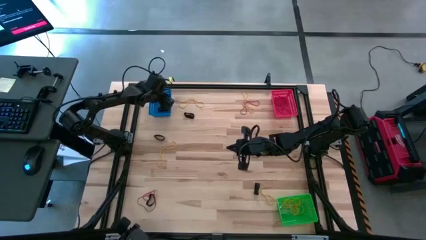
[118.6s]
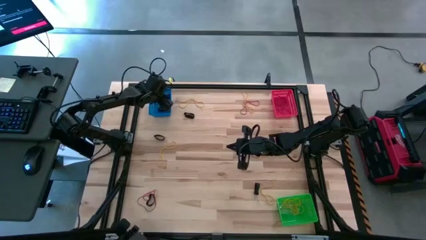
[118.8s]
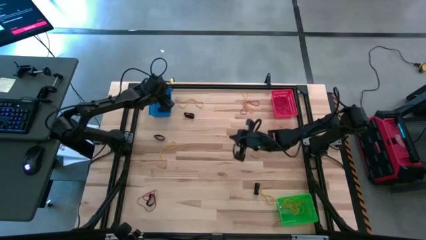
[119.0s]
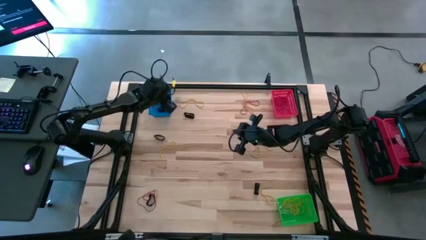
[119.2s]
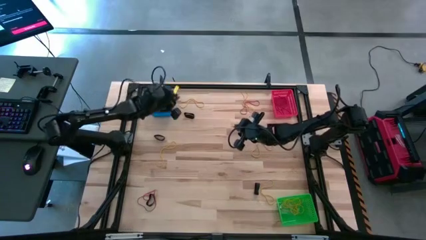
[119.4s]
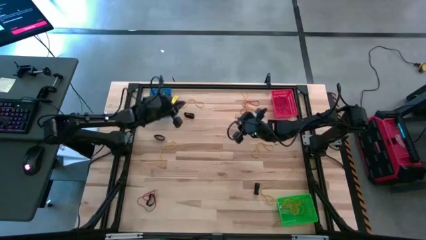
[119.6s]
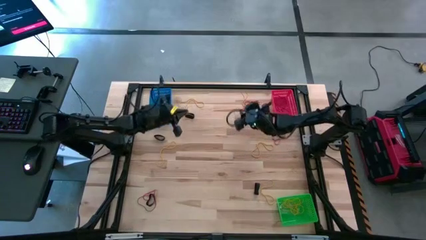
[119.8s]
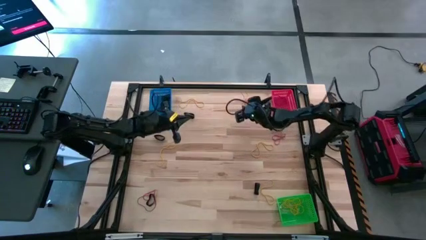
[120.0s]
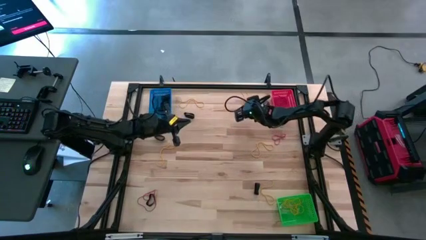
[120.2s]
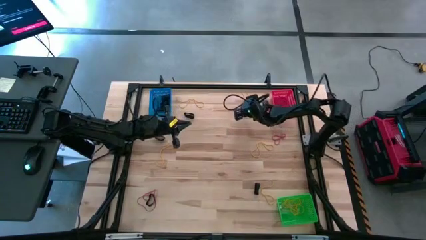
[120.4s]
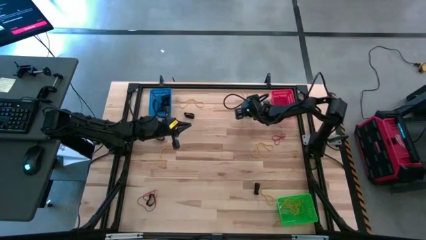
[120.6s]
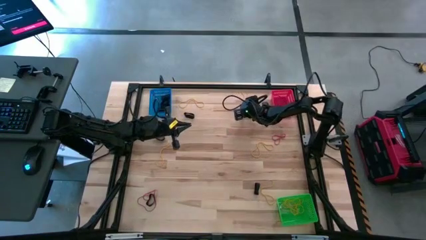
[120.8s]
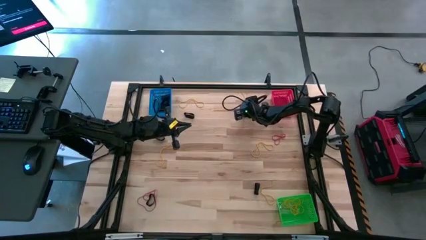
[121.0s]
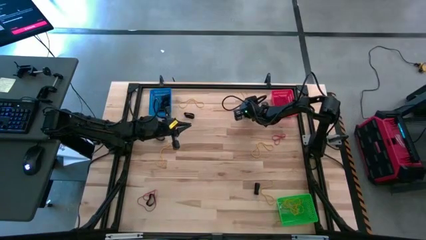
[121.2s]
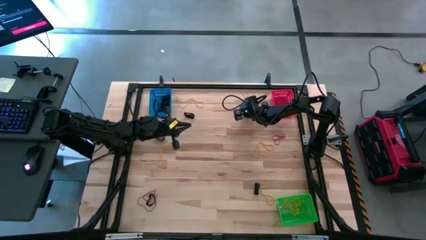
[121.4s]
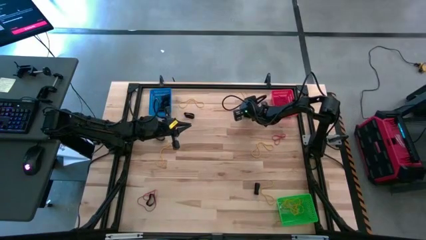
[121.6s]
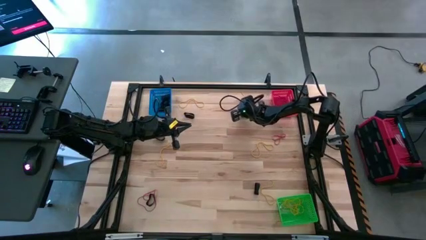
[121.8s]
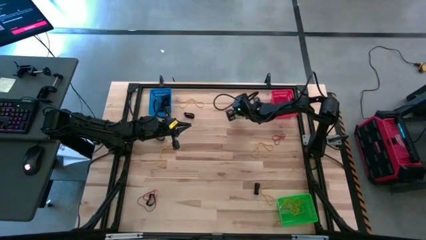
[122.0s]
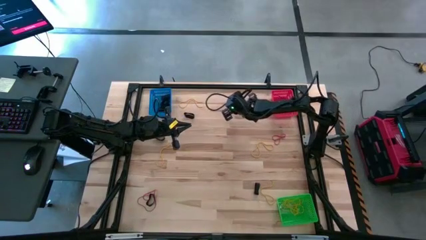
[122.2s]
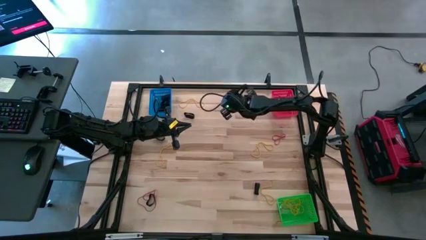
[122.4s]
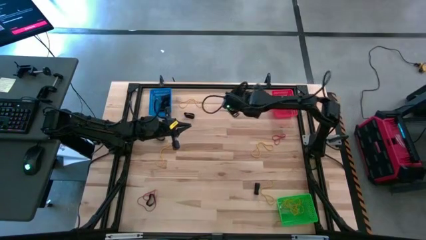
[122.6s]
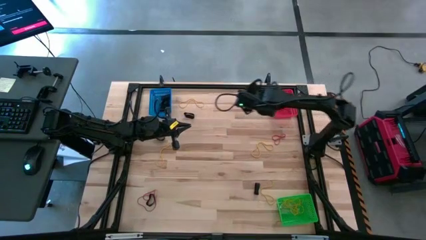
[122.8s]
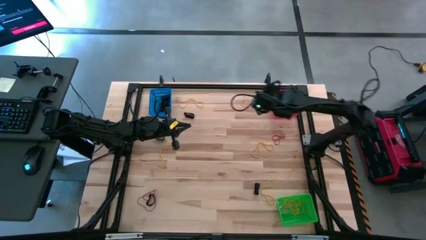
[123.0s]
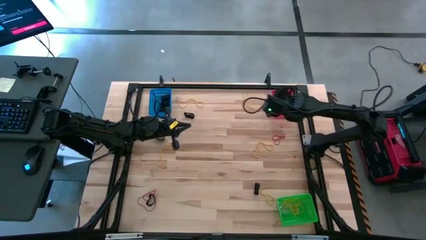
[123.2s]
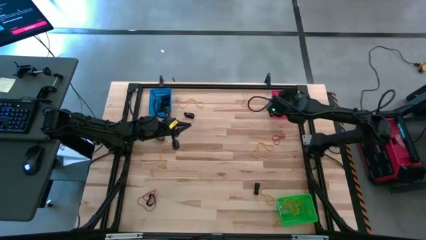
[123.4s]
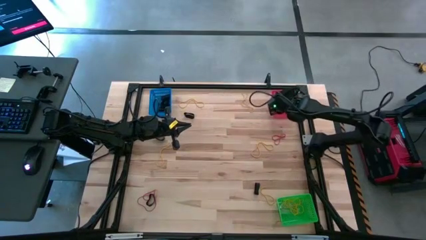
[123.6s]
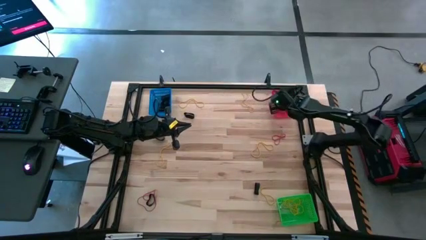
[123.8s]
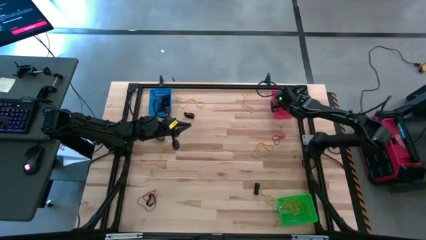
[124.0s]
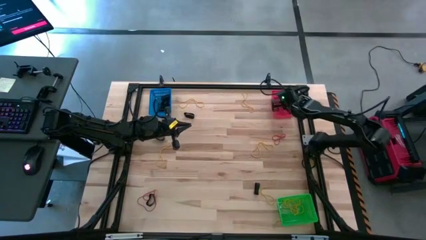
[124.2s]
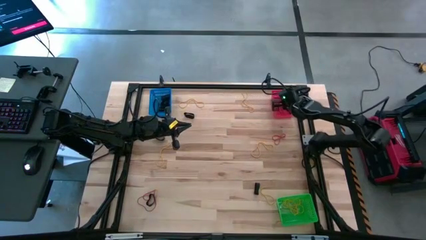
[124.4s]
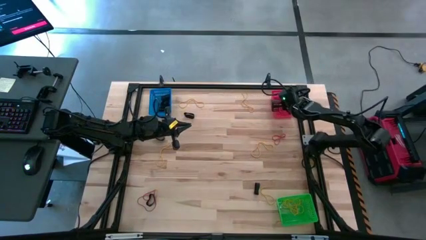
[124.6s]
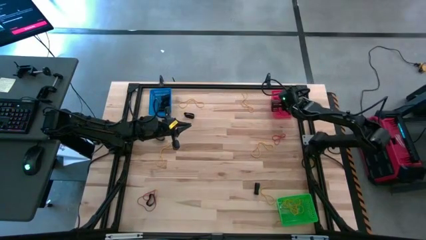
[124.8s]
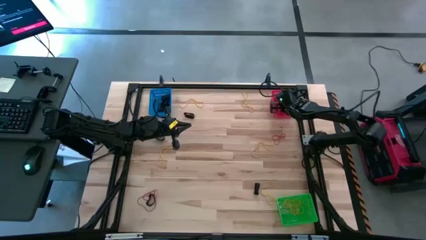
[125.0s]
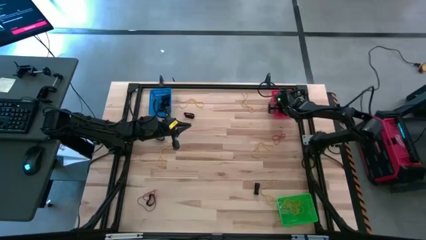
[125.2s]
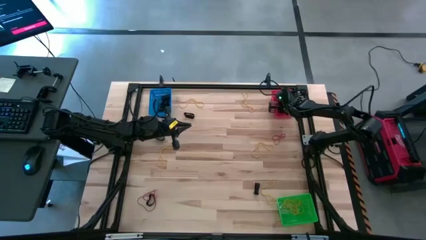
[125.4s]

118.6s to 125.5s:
Task: Sort rubber bands into baskets
Put the red rubber band into the red bin

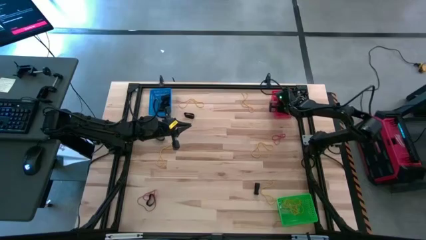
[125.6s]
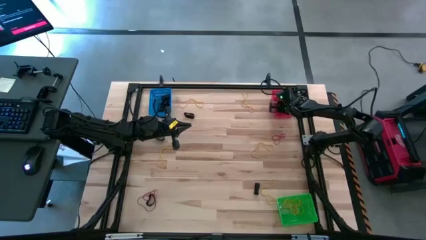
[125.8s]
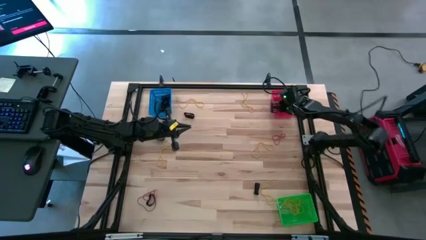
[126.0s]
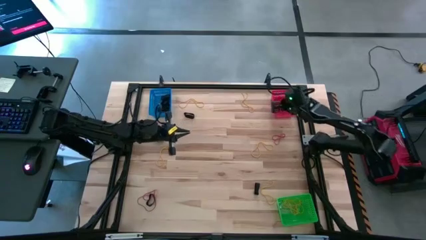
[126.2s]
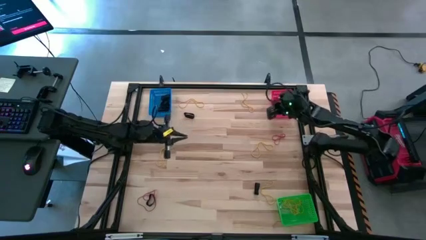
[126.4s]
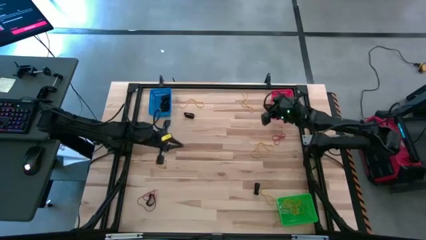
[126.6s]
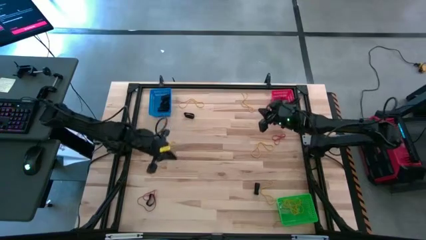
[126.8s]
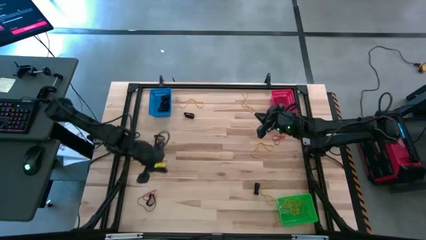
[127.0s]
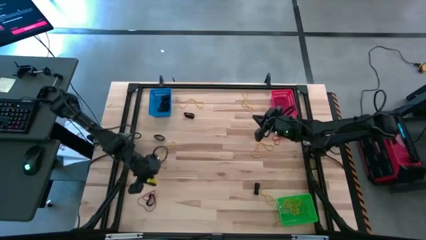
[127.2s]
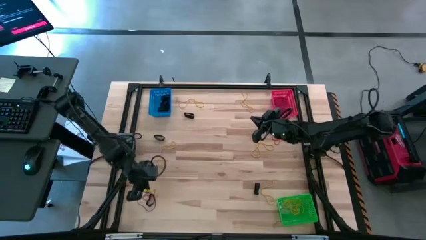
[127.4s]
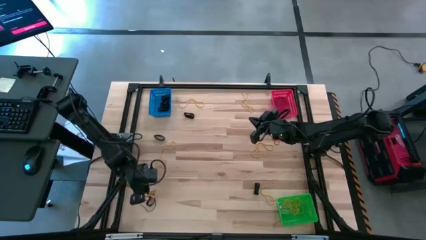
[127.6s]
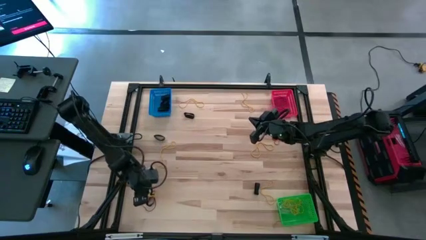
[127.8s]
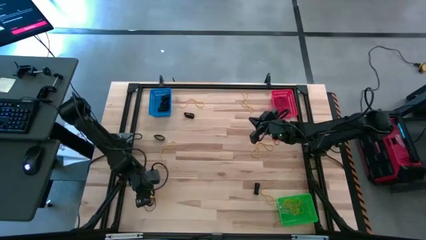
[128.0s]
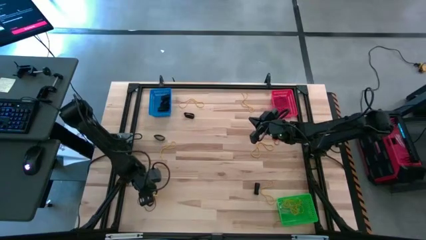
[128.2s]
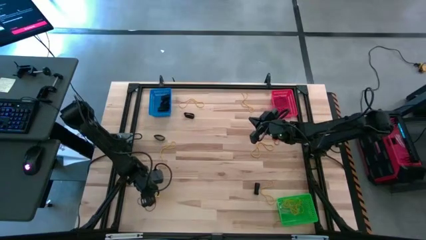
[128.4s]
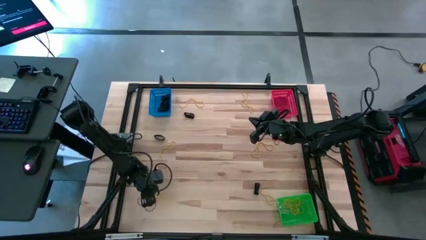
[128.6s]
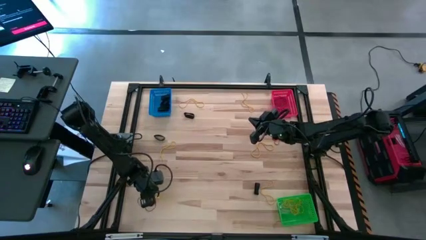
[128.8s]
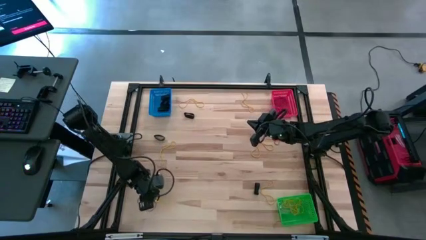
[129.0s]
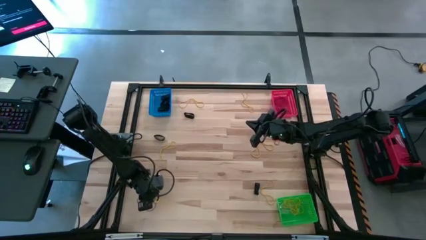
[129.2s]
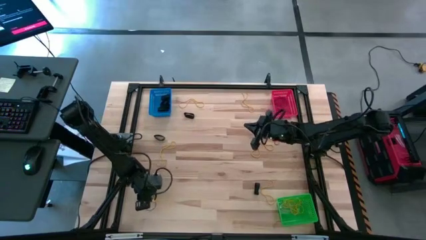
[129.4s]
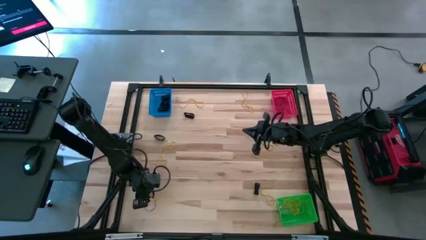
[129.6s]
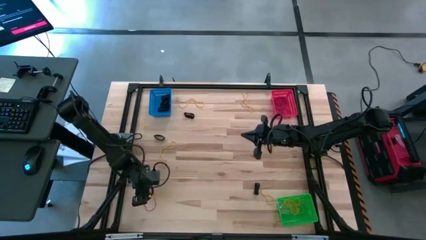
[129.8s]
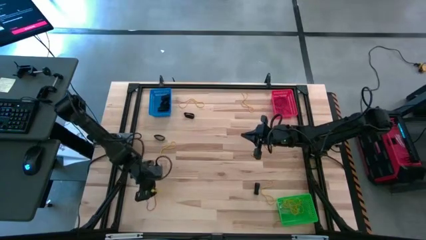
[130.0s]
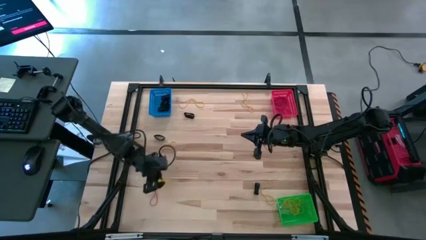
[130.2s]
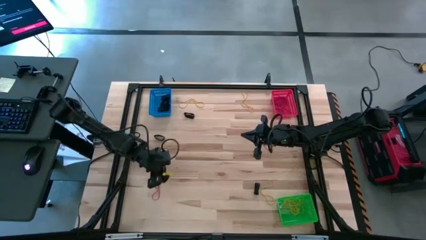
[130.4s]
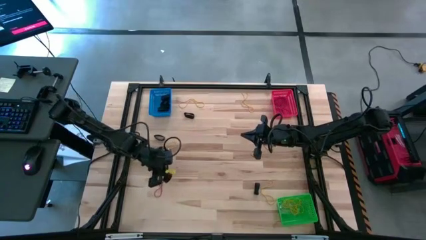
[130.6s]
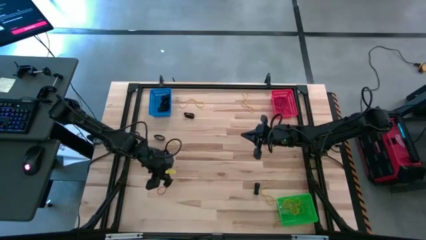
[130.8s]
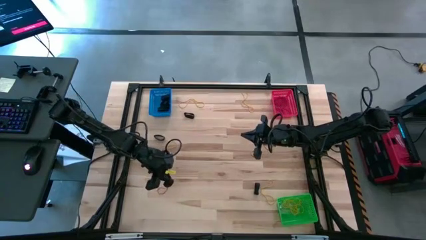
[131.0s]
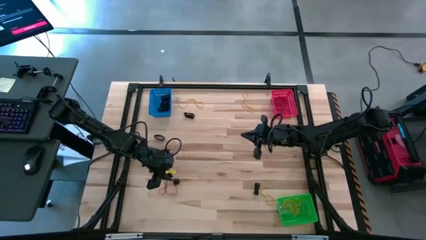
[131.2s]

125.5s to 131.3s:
Put the black rubber band into the blue bin

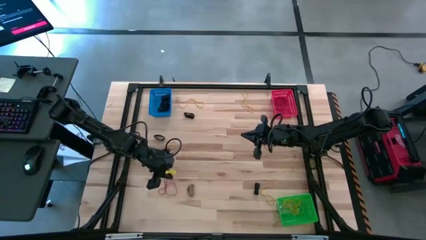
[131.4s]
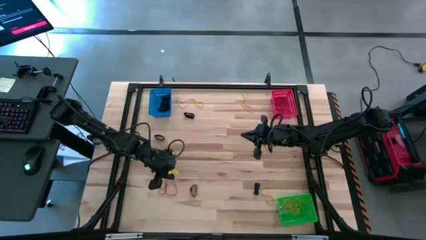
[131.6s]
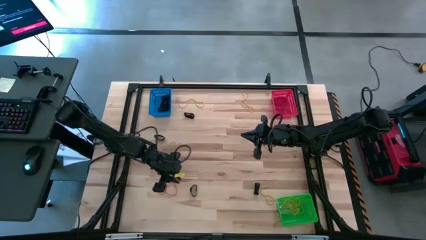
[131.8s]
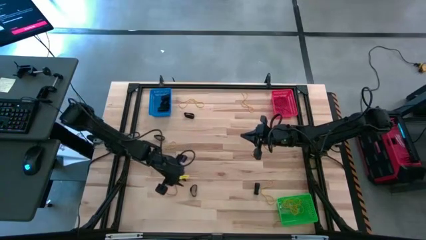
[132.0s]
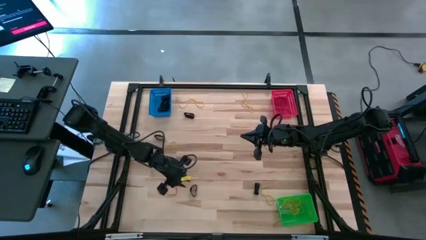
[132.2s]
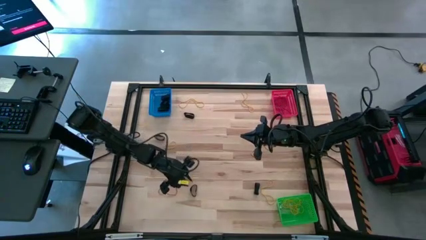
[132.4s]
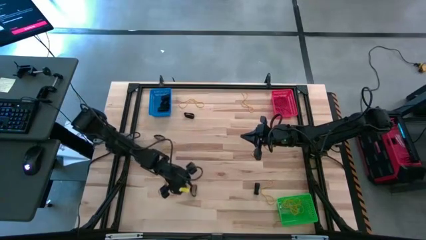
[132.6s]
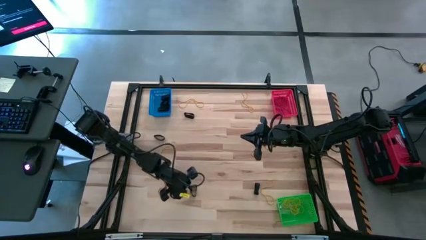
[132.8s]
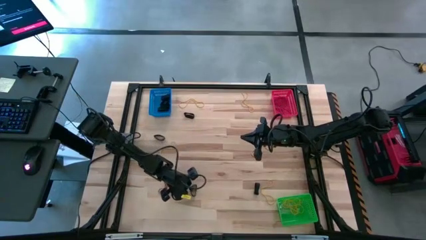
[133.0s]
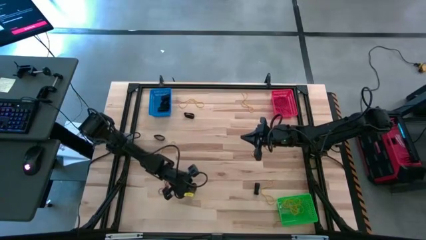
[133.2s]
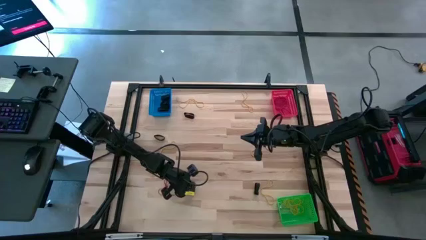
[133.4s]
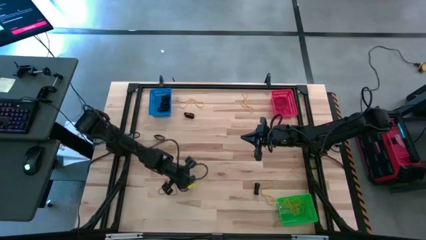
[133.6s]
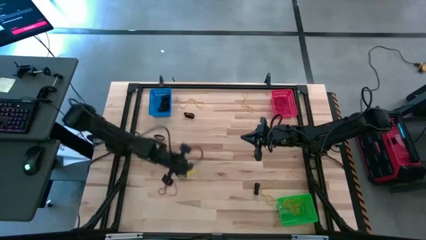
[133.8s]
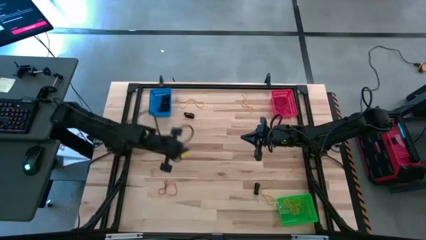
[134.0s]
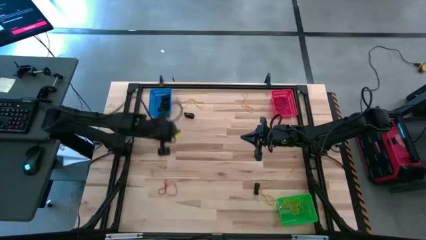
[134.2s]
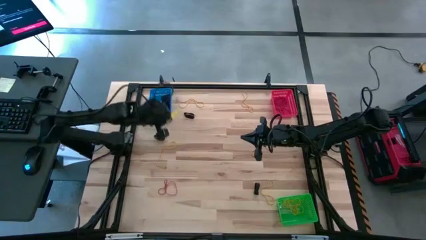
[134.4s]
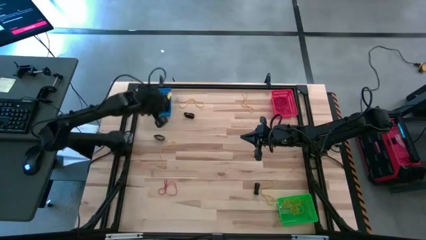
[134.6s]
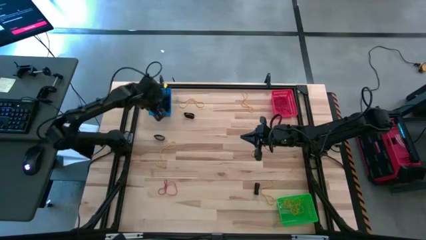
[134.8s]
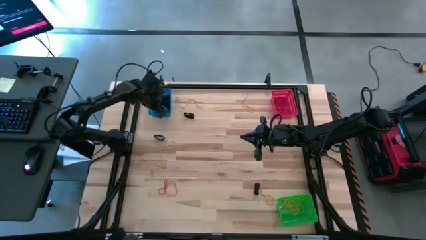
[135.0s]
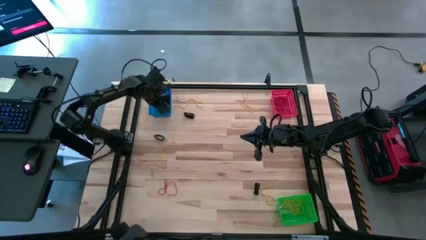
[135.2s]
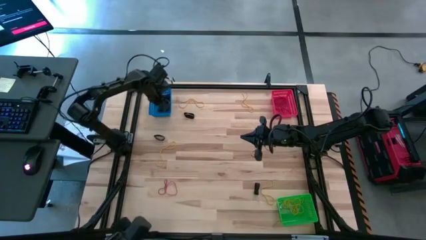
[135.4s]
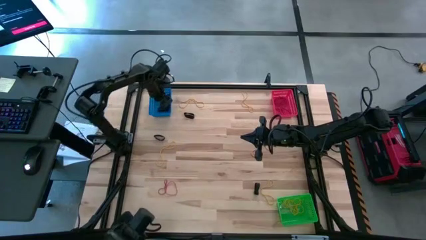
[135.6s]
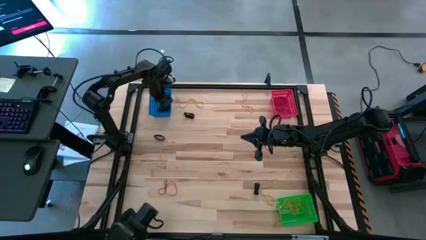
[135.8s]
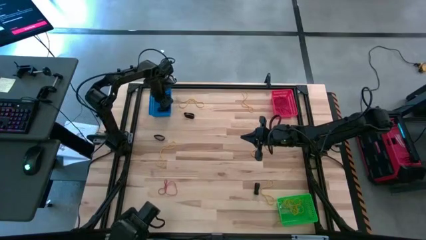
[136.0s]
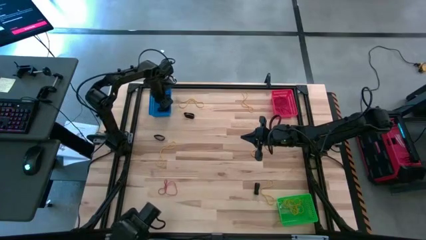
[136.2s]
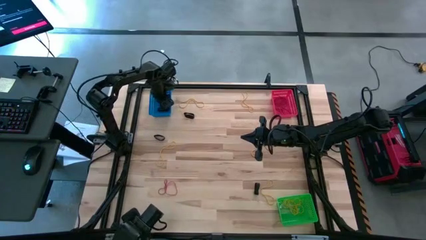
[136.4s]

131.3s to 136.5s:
Put the black rubber band into the blue bin
